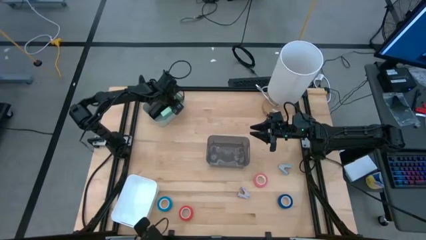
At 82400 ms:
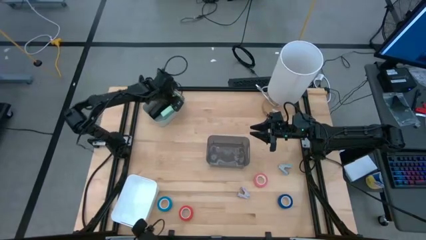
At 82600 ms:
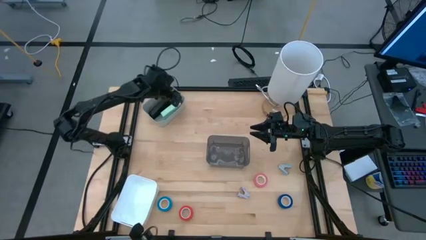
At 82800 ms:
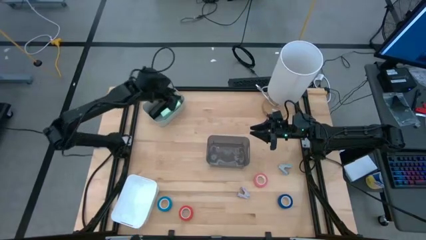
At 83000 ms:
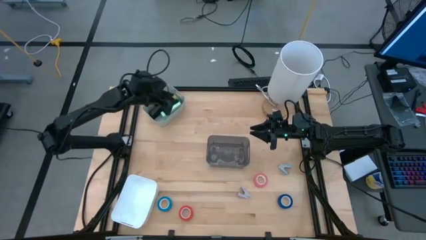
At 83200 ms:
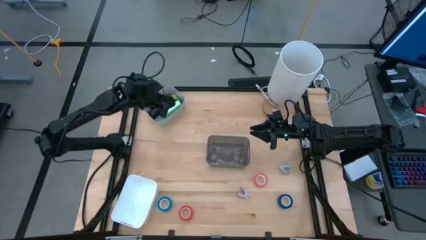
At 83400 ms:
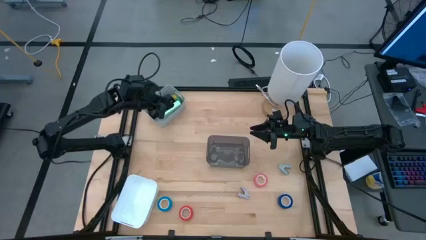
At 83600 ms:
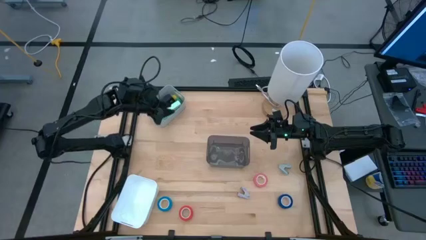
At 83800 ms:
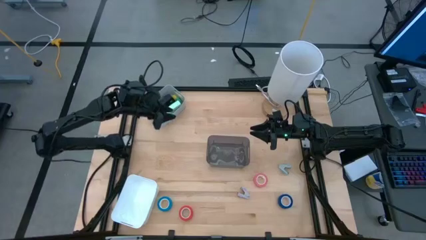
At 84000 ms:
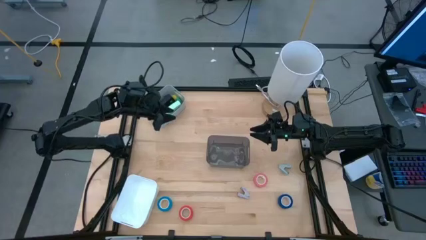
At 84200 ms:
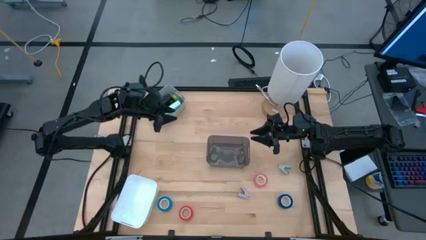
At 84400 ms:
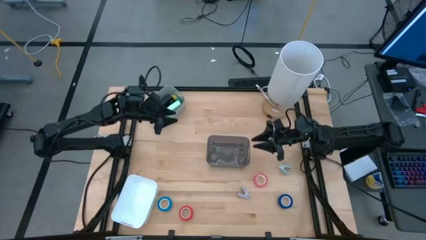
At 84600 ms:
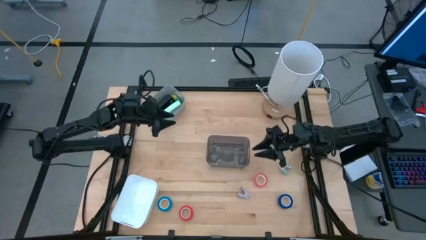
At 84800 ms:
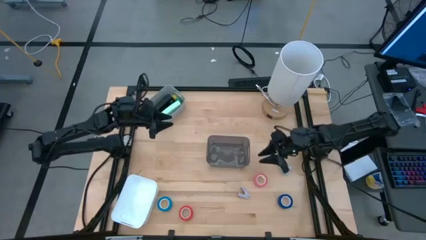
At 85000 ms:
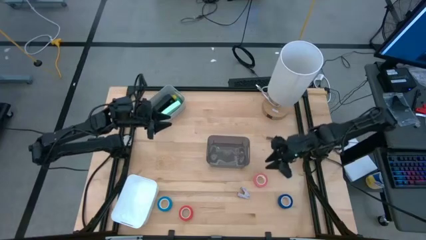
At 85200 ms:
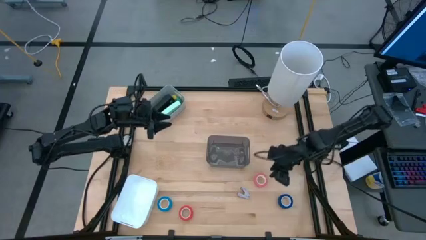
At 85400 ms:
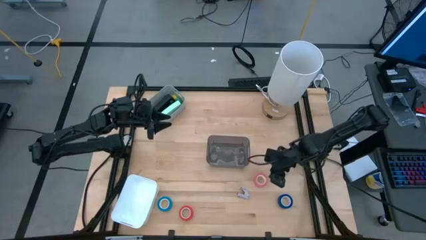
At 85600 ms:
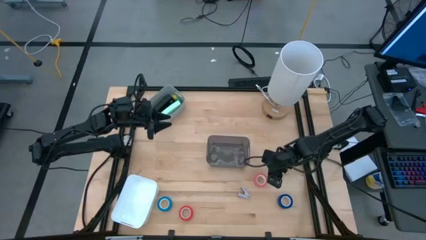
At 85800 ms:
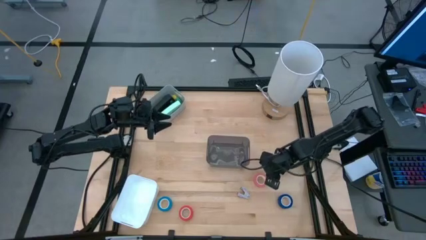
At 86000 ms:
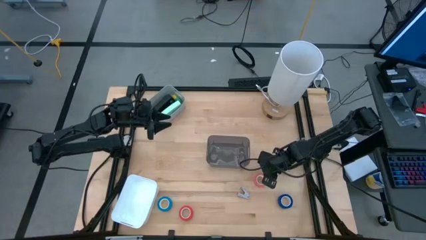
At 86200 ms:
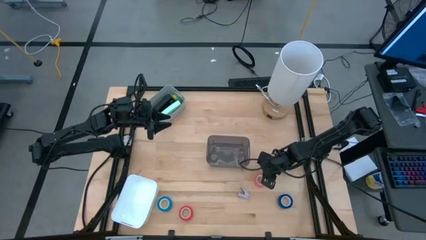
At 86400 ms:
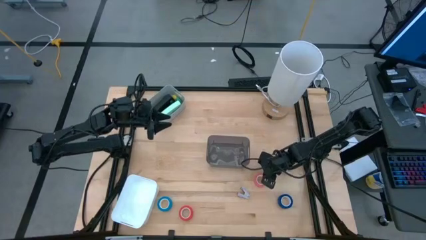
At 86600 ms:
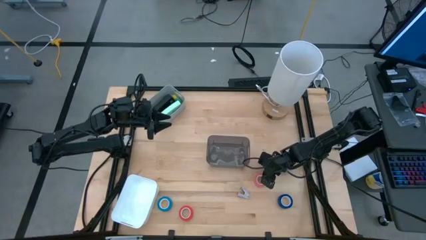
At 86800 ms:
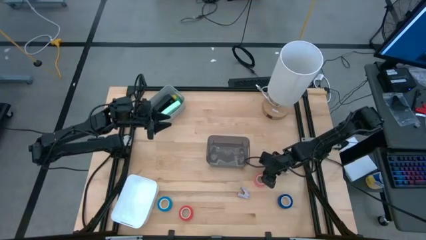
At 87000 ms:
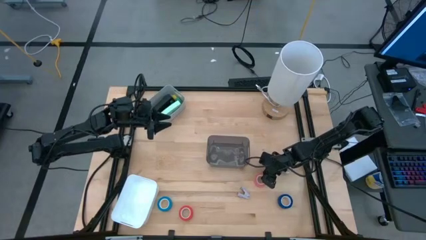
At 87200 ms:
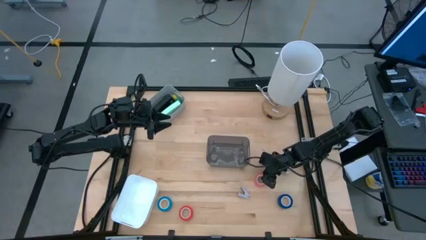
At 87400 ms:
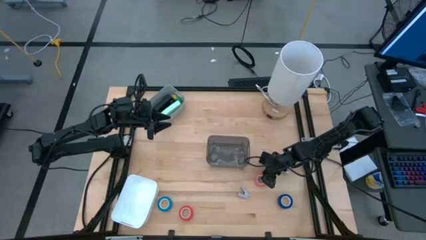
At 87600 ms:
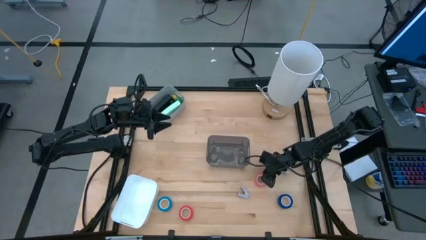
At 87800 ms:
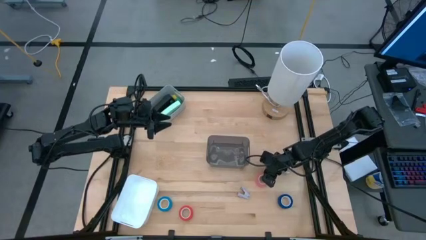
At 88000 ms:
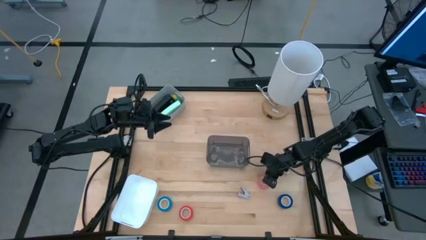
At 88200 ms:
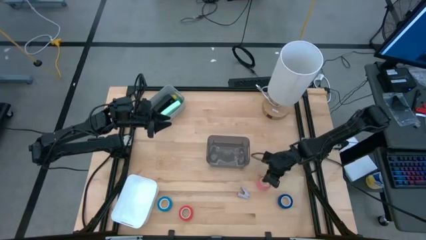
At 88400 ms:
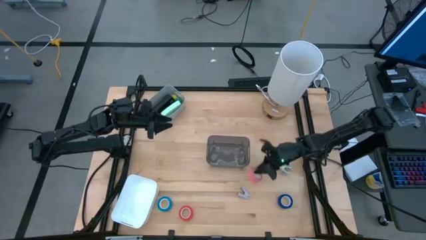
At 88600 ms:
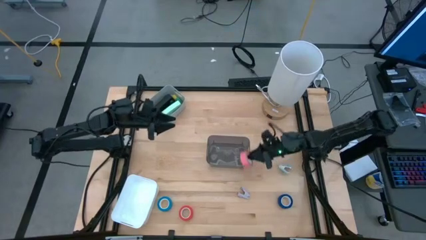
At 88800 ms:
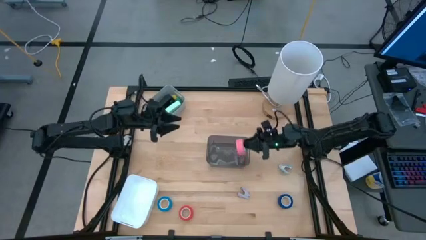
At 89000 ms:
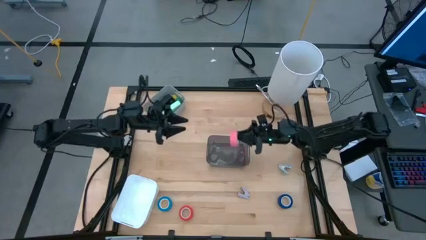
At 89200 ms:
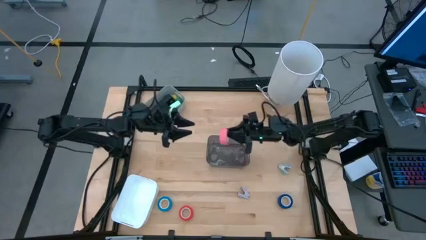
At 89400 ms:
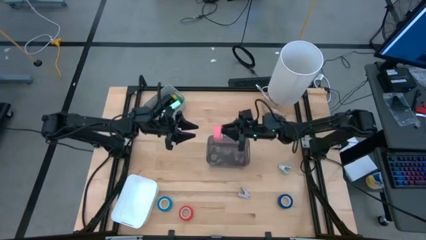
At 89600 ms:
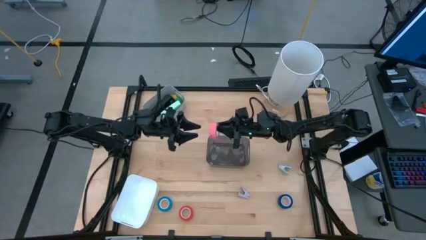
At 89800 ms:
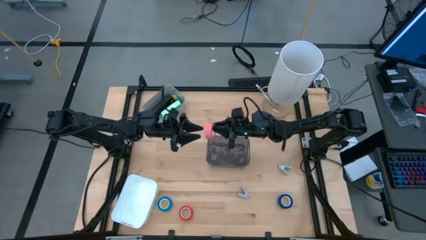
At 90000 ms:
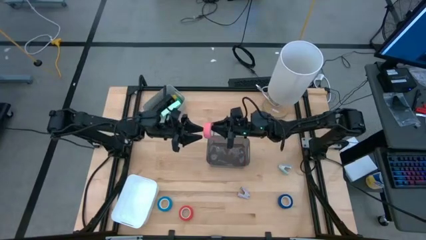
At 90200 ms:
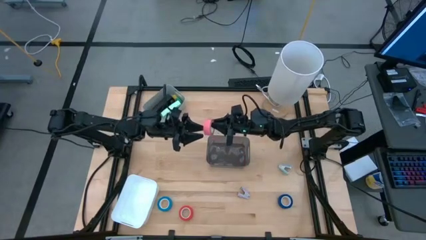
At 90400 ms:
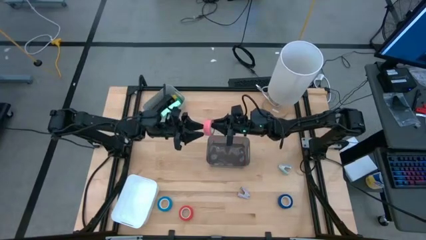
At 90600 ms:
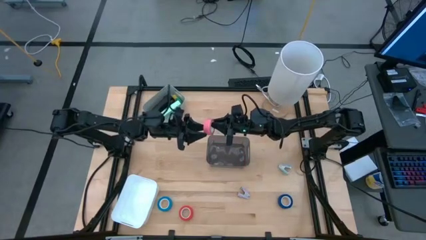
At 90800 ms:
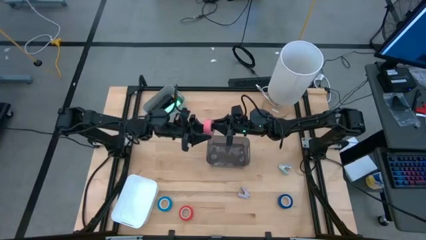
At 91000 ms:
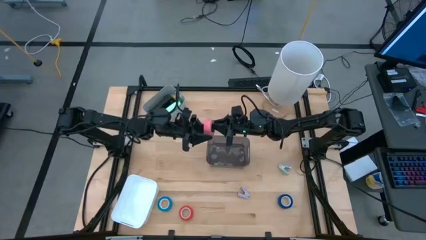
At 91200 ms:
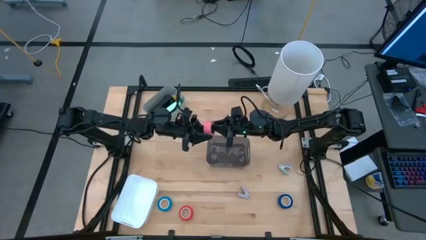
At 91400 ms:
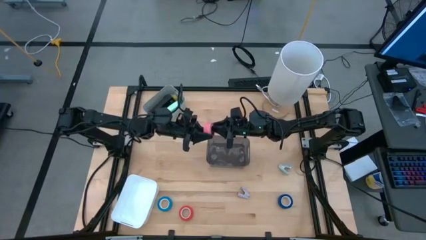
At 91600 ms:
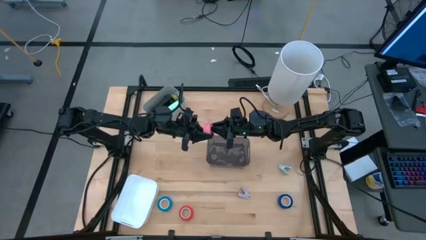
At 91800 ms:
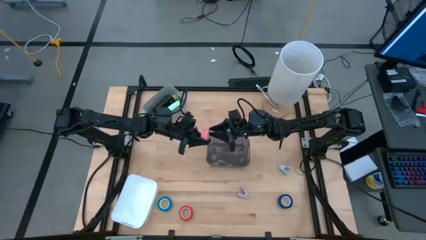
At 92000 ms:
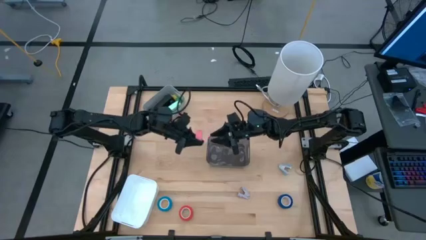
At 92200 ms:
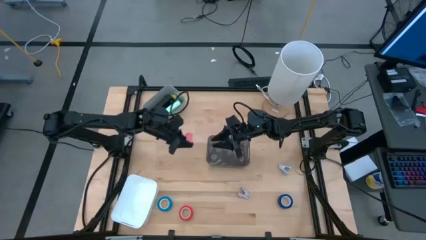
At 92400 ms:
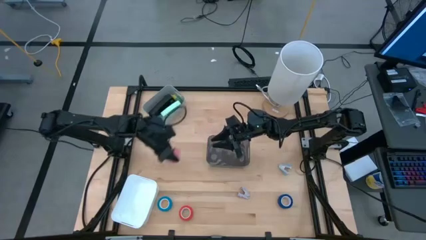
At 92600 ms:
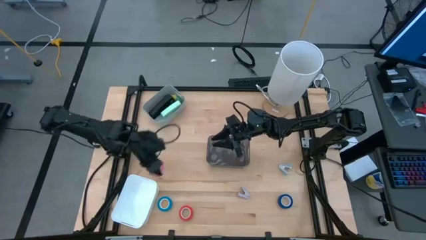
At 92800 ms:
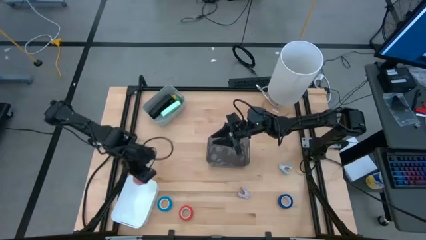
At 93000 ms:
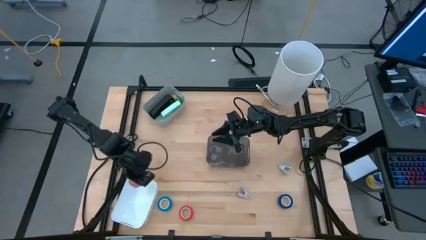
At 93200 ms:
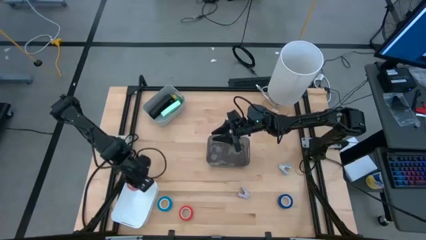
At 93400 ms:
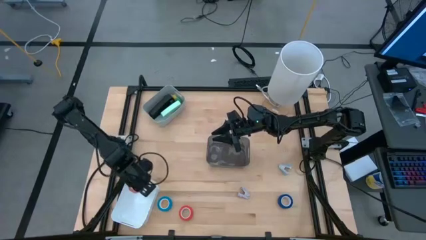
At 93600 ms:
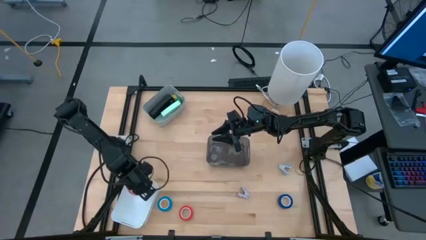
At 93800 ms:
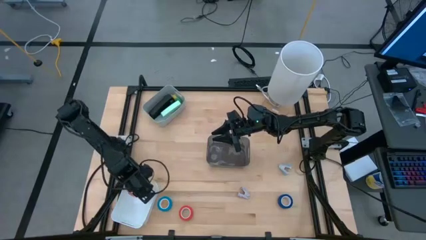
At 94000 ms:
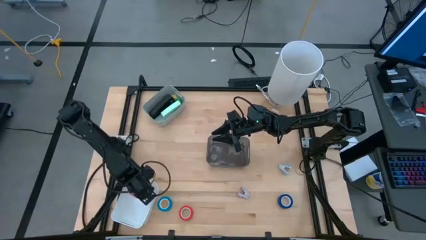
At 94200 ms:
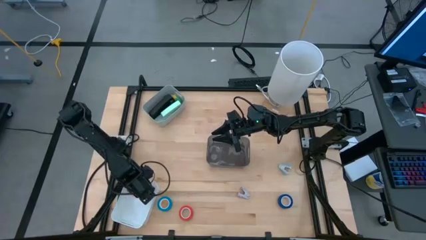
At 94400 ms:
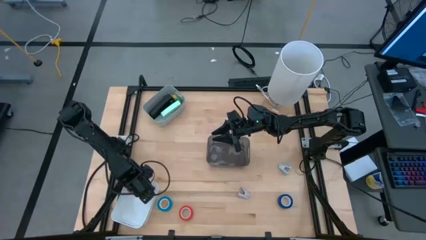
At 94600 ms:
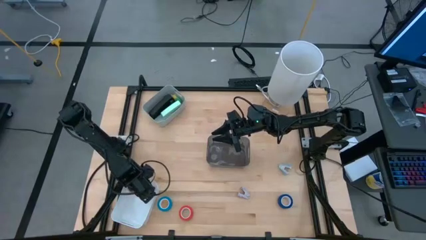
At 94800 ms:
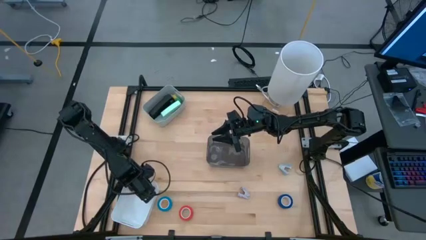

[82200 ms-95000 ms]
Task: Pick and place Stapler, Stapler remover, tape
Put the pink tape into the white bin

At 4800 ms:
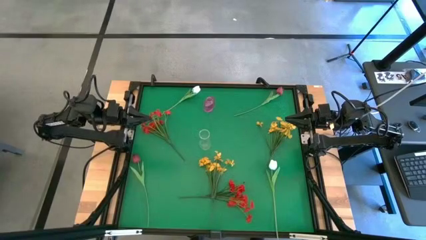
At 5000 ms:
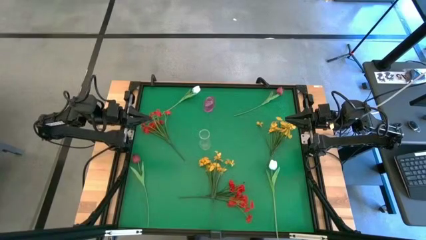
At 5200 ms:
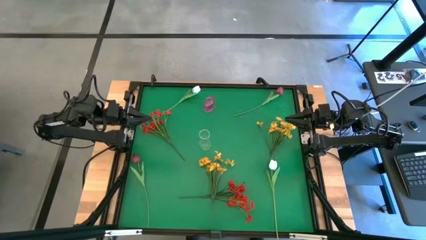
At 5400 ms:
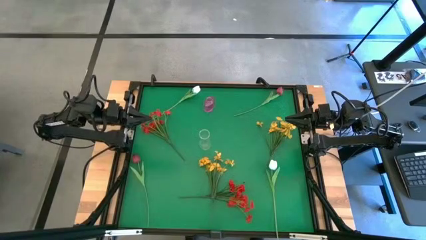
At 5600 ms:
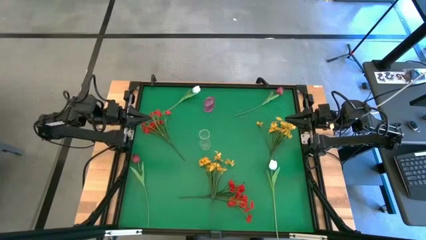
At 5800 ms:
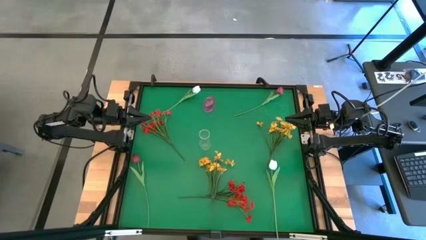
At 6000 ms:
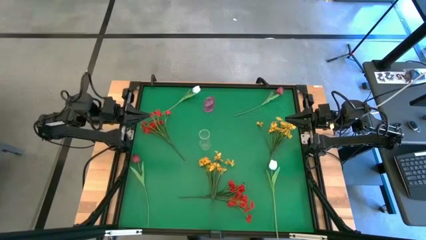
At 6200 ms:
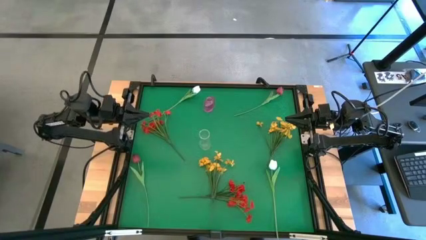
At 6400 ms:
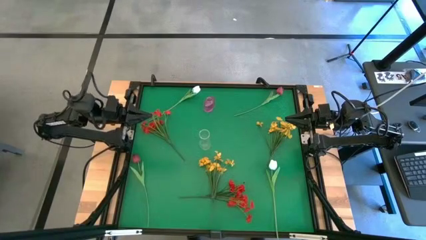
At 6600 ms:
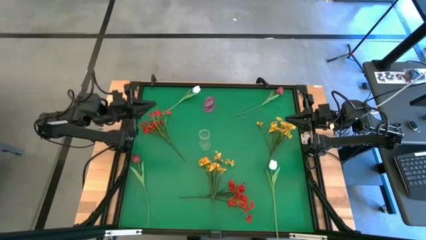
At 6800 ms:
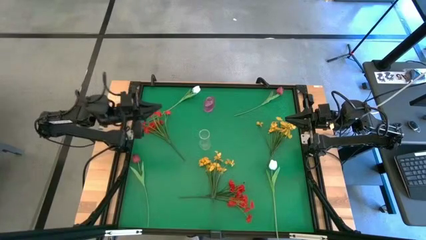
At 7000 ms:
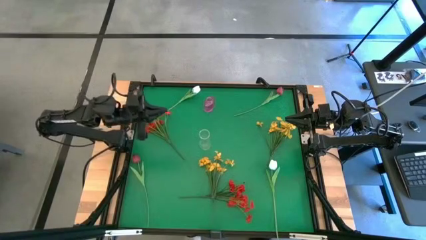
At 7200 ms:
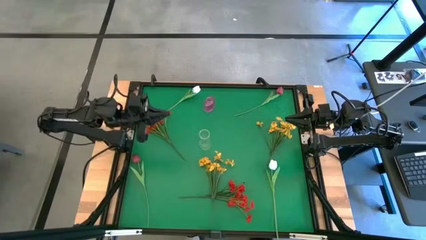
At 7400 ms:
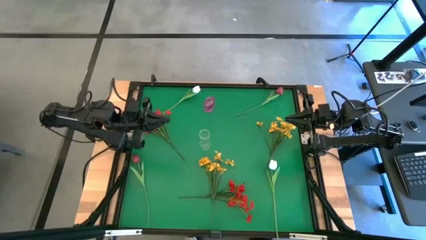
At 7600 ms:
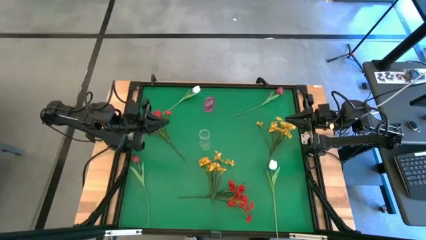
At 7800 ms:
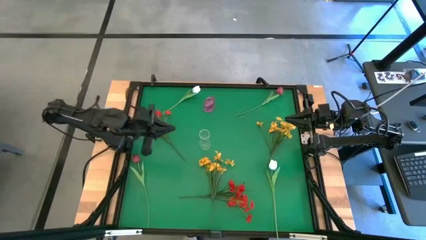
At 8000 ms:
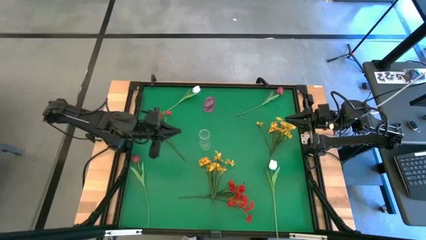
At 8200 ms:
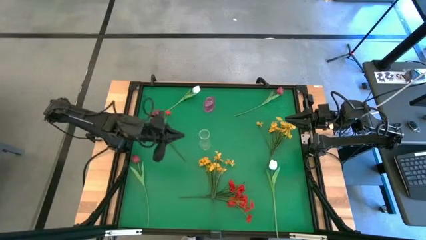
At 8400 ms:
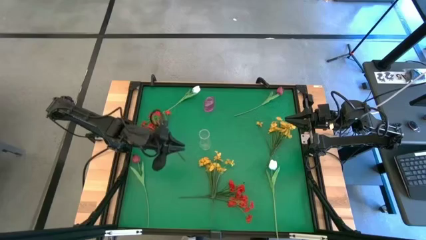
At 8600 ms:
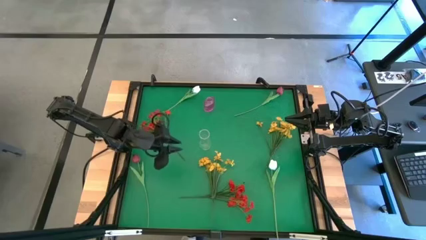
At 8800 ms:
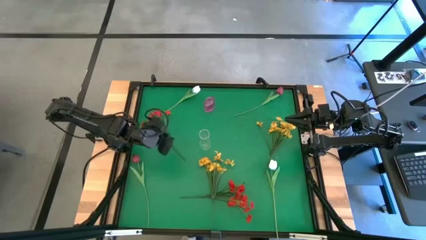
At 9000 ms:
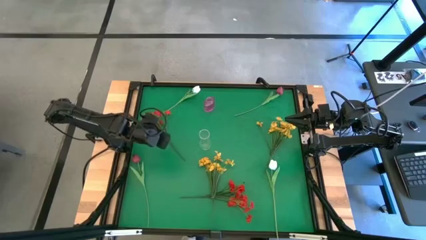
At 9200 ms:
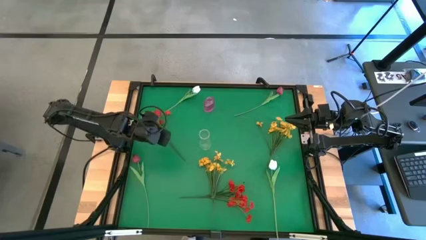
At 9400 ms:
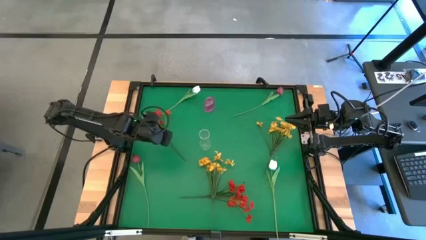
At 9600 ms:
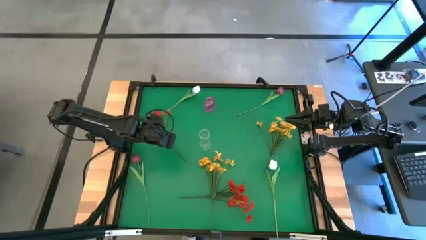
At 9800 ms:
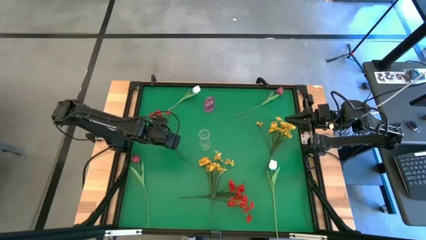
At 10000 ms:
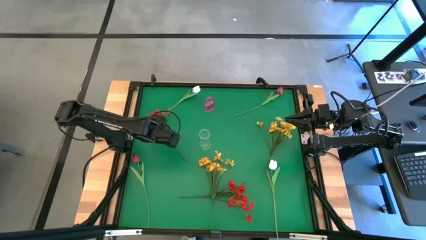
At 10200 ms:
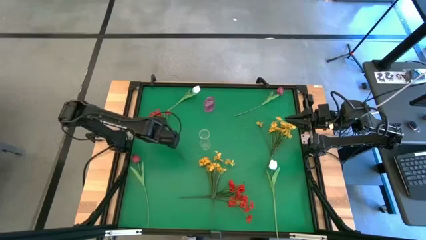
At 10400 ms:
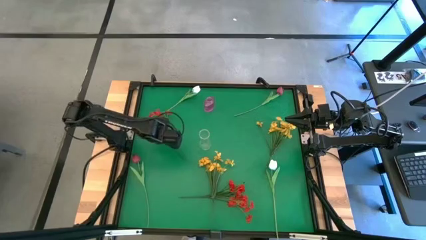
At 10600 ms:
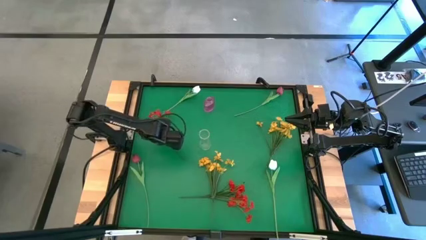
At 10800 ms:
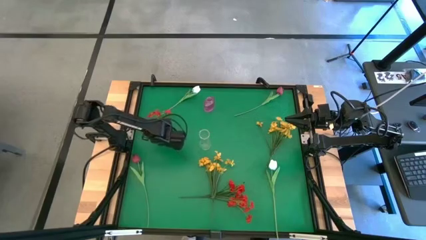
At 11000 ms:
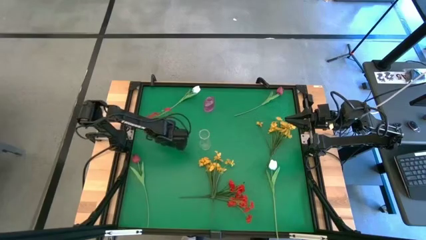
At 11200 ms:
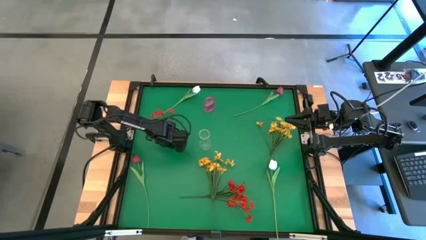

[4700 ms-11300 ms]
Task: Sort flowers into vase by color
Put the top red flowers into the transparent vase
